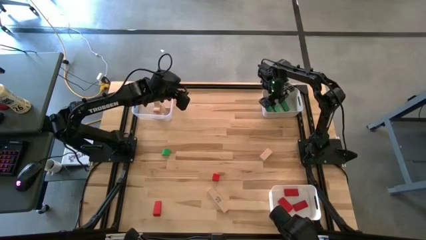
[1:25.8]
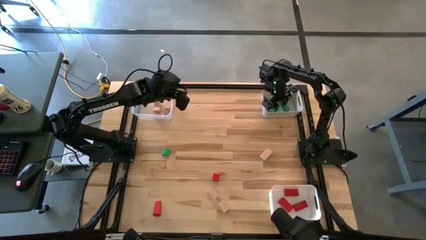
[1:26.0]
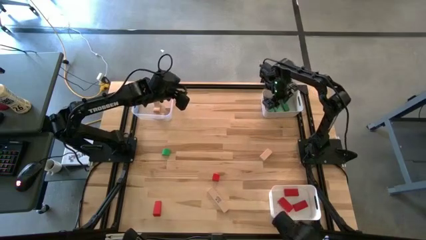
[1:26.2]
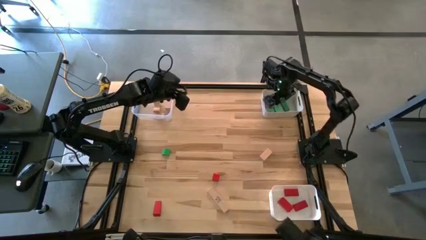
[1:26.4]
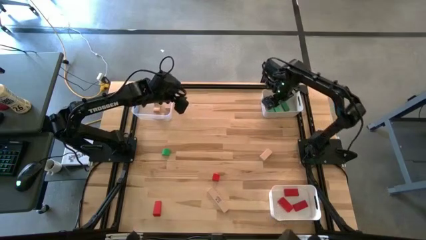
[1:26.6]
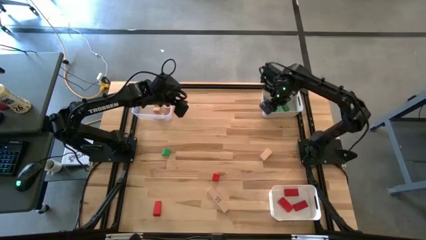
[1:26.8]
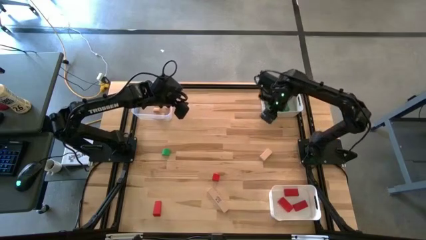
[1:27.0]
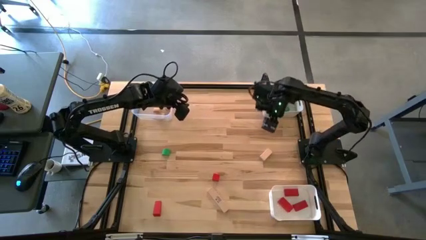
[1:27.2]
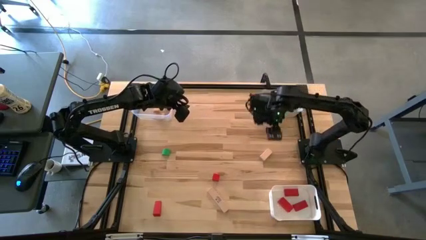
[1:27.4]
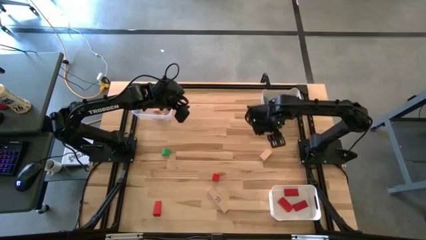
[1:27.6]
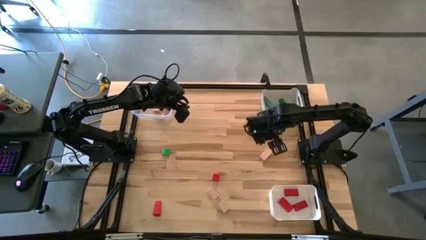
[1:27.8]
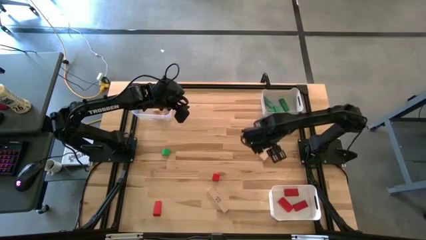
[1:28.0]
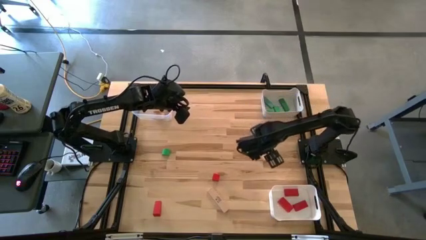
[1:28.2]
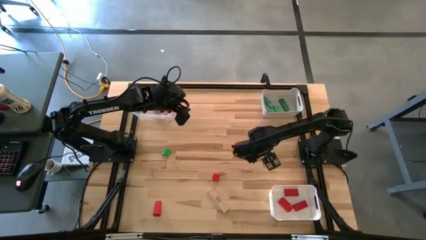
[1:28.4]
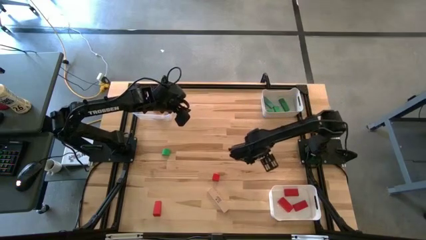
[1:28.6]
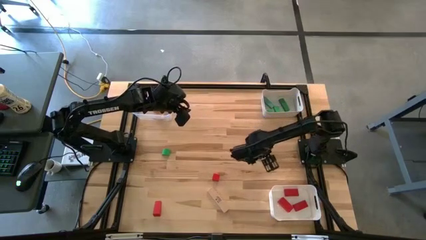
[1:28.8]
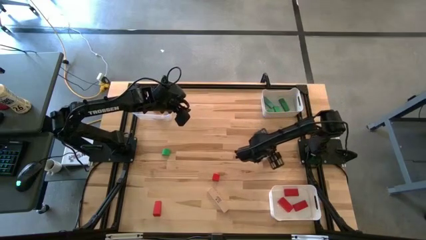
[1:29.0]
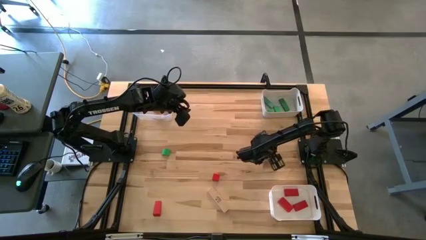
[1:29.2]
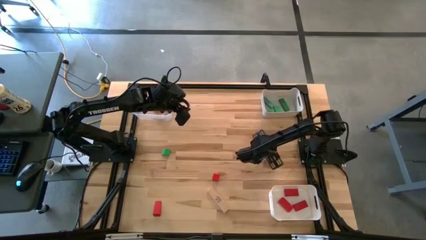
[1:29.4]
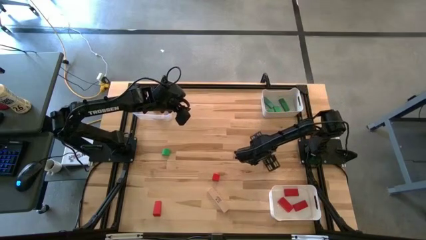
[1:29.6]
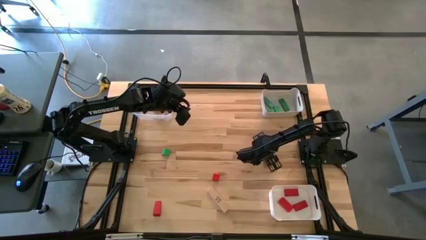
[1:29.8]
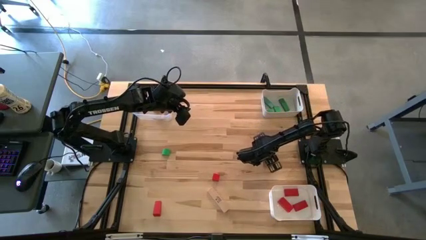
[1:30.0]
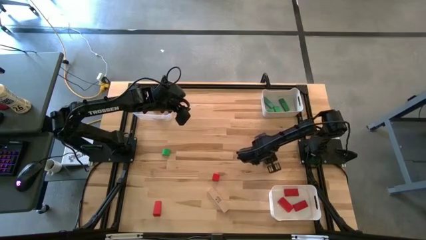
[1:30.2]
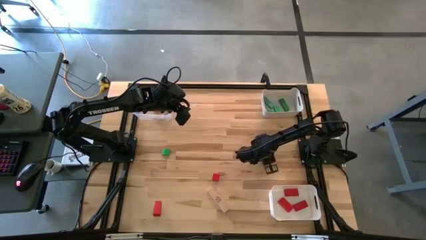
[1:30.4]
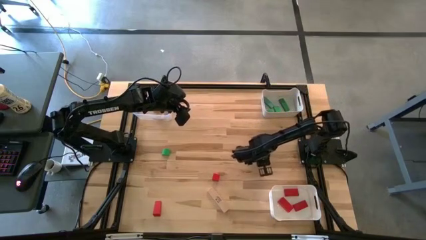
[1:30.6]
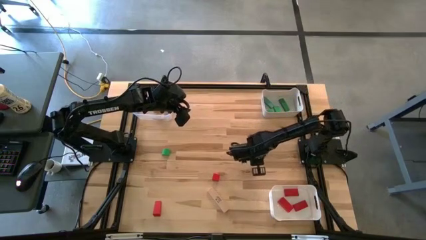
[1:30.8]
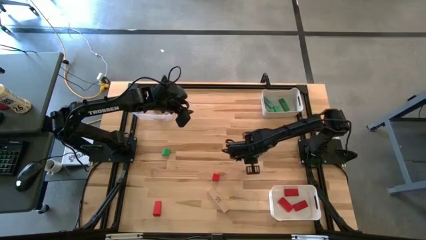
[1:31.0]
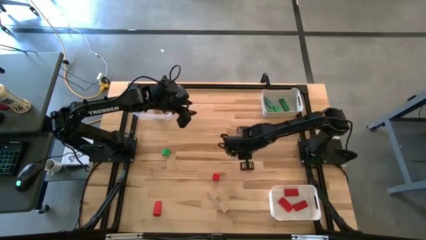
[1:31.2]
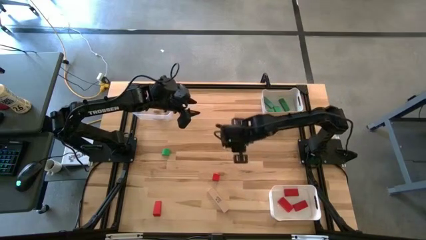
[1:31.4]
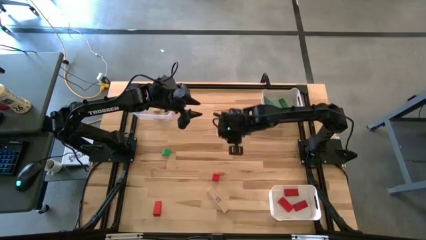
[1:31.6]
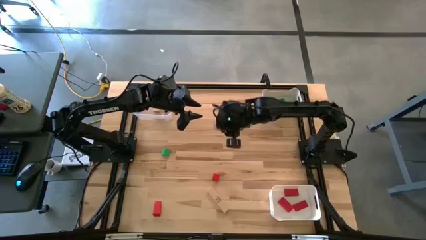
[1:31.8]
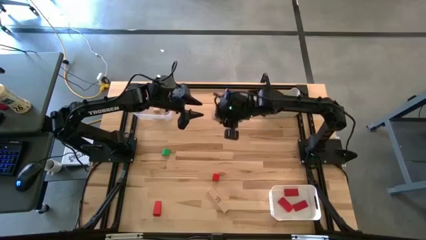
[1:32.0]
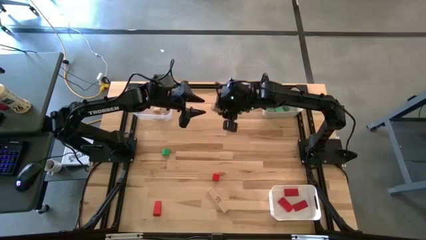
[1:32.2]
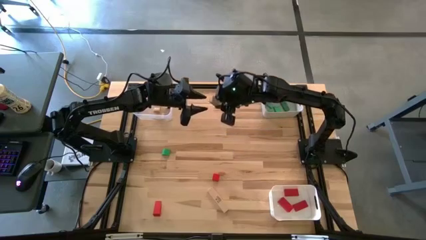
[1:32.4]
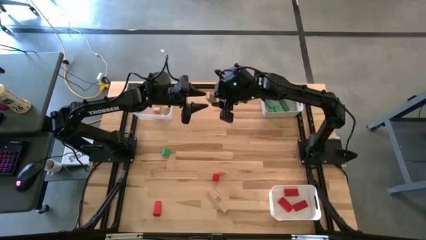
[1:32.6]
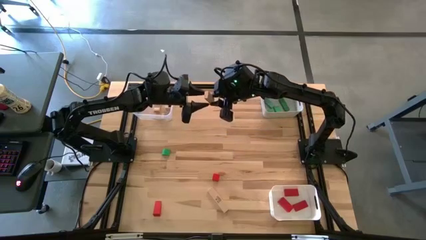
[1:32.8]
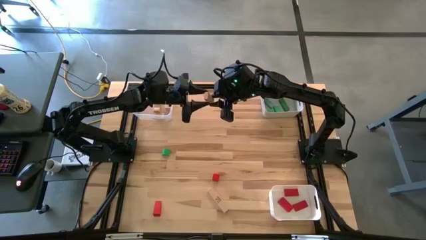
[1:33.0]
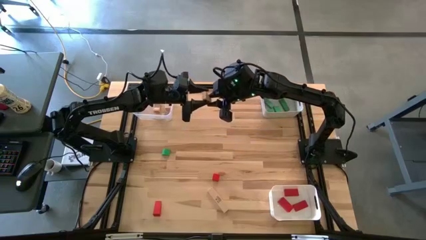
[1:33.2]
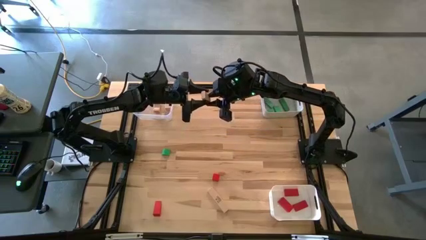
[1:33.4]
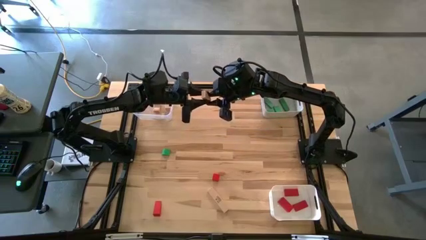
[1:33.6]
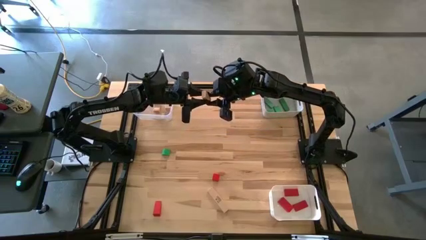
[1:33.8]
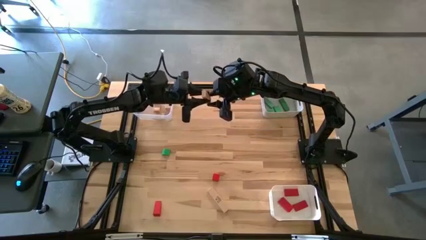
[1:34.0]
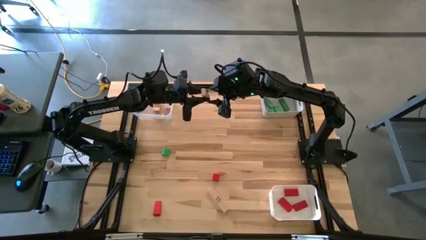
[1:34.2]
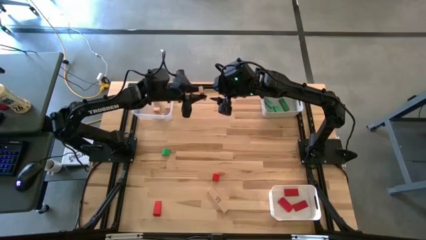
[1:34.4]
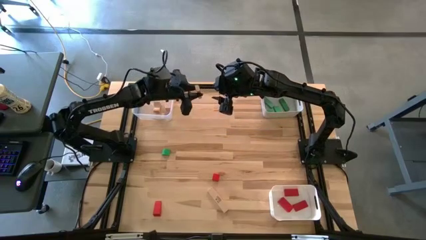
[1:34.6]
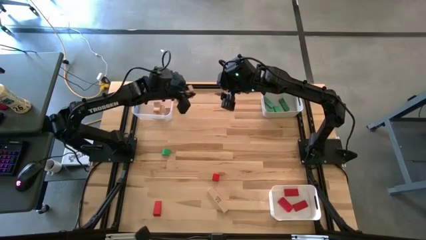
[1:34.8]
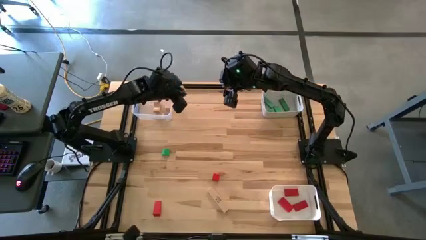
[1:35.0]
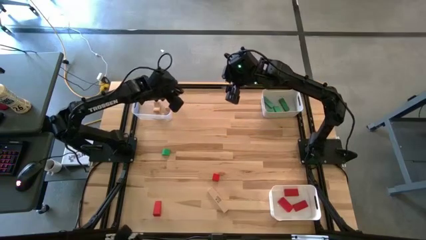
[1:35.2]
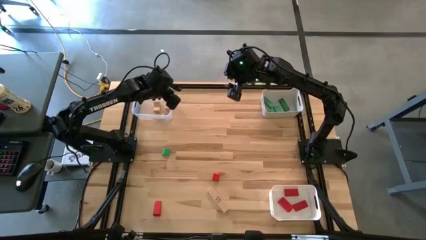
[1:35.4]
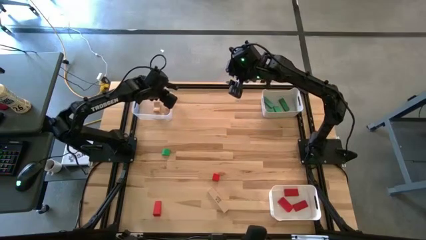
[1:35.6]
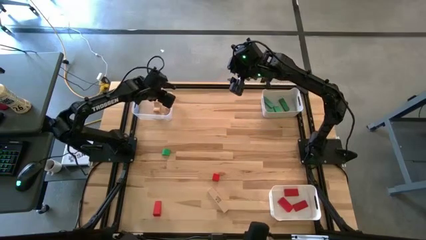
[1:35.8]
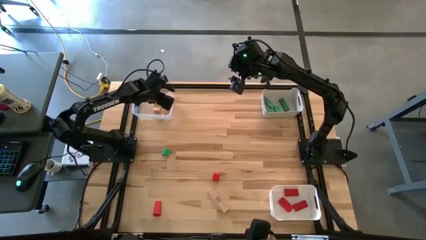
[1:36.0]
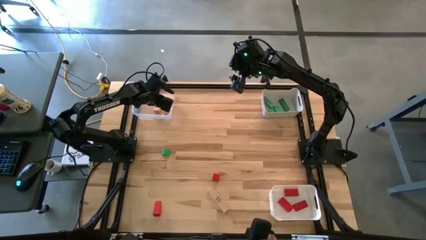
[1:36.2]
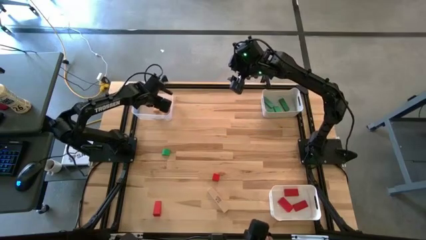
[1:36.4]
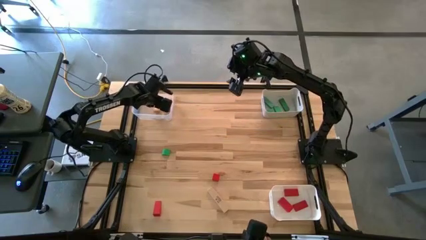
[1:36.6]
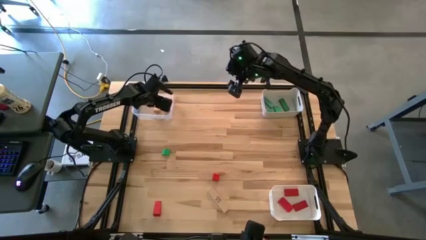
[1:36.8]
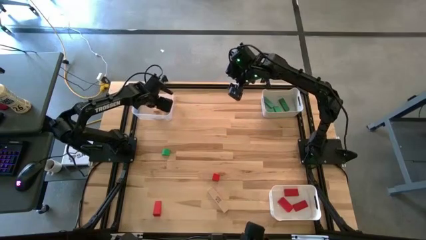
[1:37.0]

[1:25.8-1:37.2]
Task: Sort & place blocks by color
Put the brown block into the transparent bin

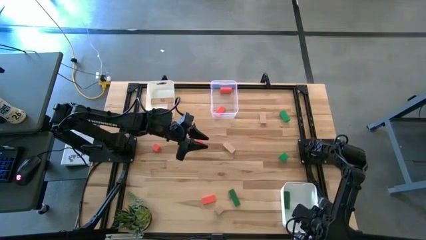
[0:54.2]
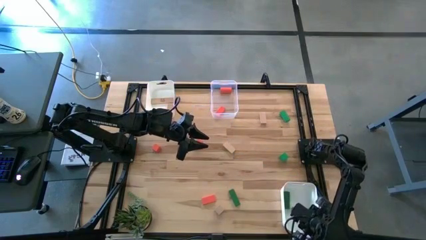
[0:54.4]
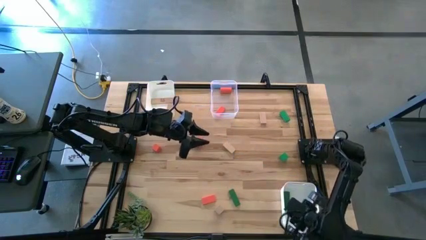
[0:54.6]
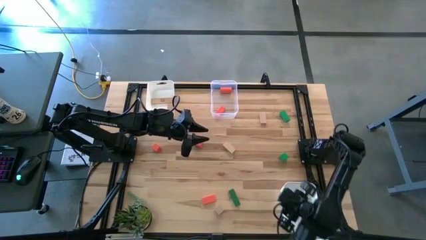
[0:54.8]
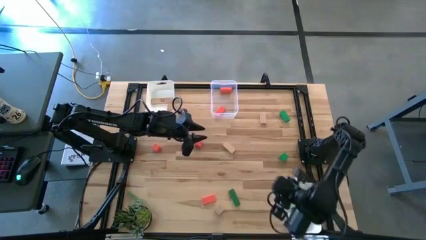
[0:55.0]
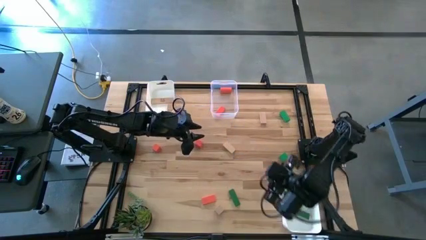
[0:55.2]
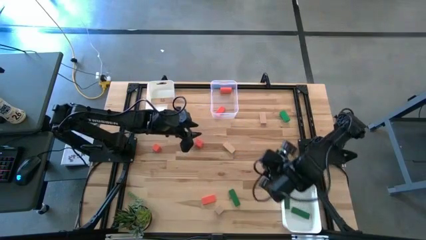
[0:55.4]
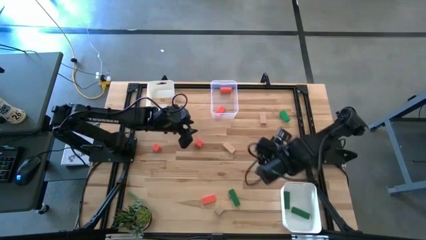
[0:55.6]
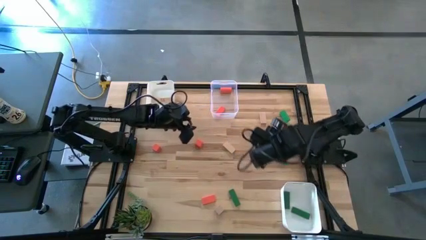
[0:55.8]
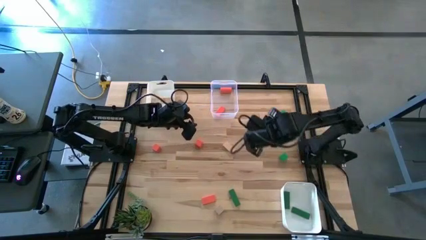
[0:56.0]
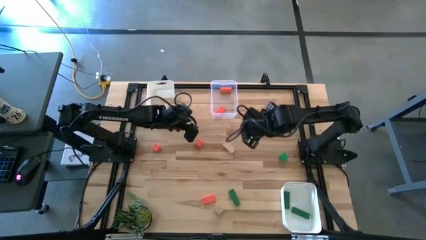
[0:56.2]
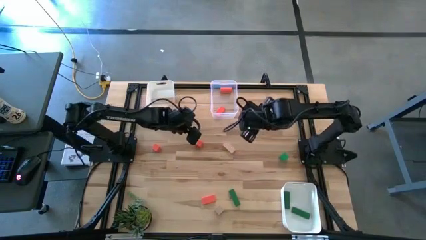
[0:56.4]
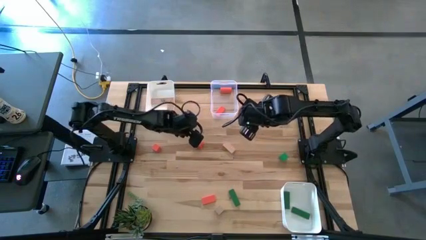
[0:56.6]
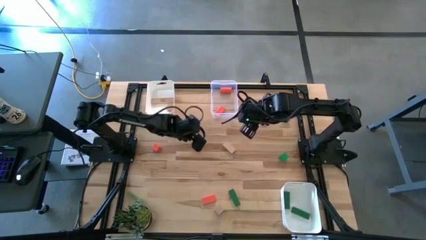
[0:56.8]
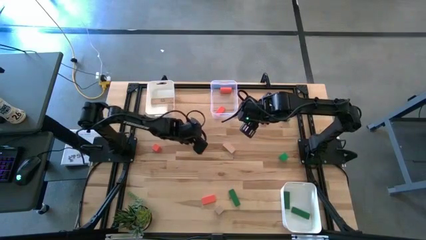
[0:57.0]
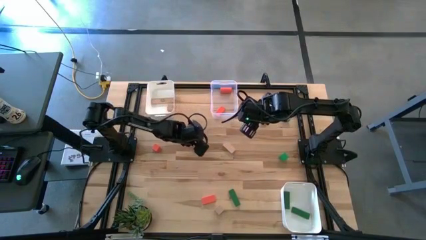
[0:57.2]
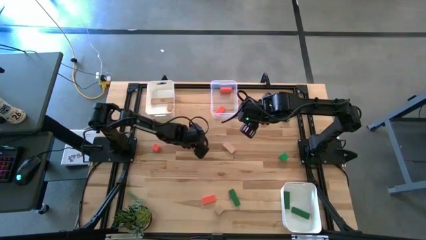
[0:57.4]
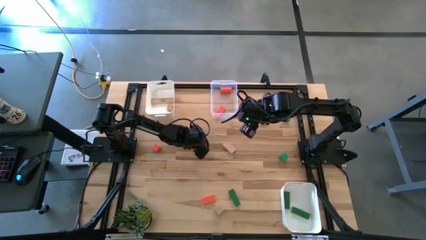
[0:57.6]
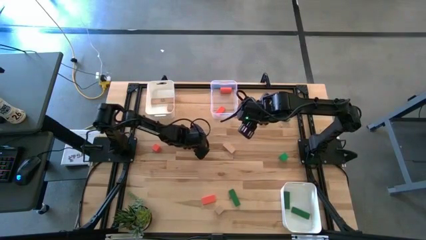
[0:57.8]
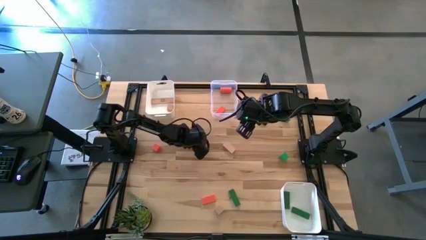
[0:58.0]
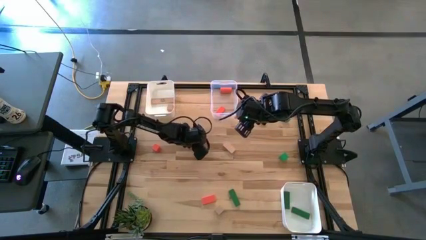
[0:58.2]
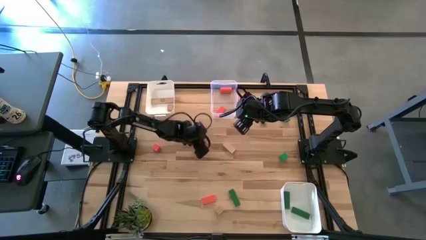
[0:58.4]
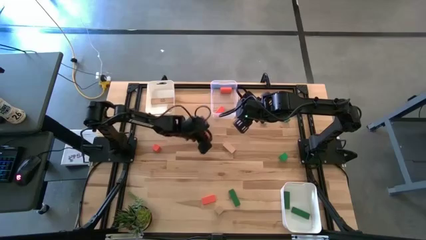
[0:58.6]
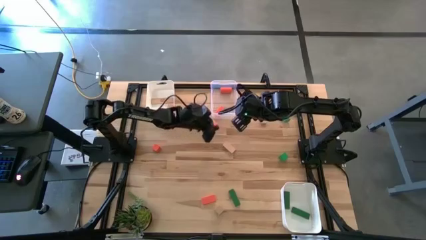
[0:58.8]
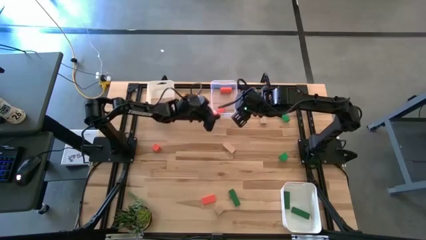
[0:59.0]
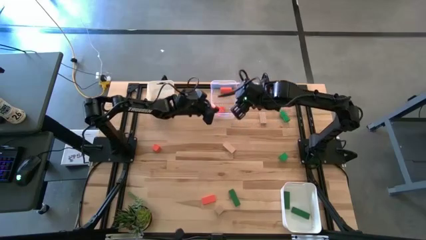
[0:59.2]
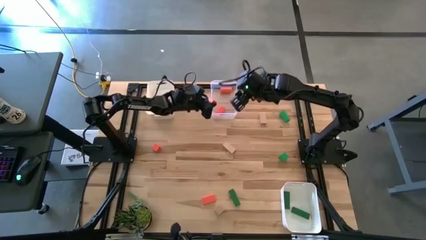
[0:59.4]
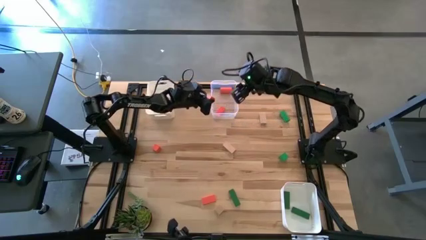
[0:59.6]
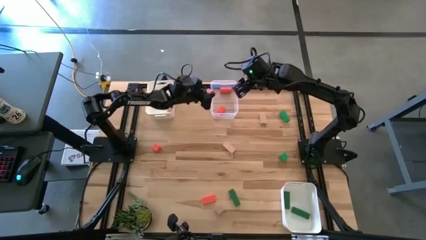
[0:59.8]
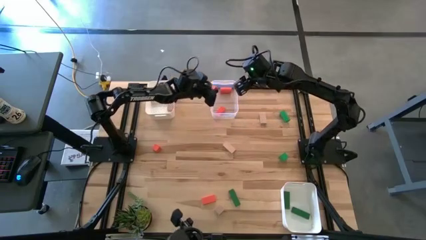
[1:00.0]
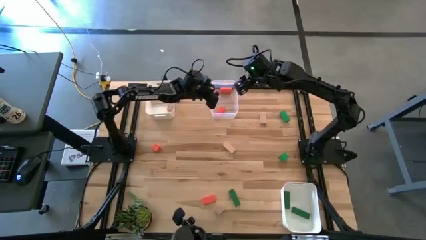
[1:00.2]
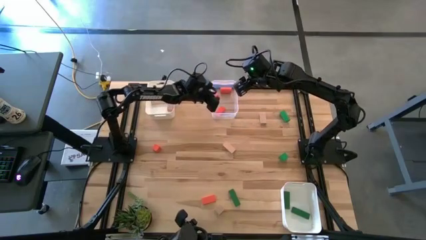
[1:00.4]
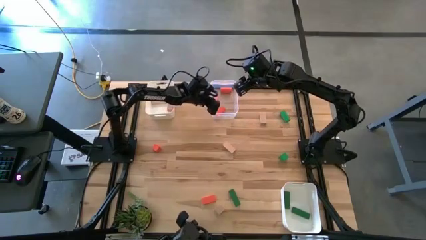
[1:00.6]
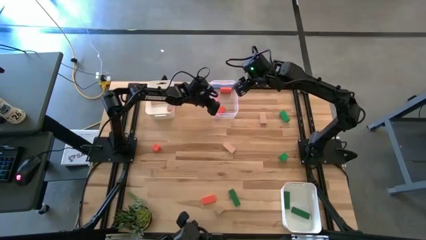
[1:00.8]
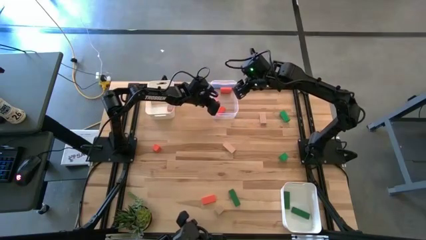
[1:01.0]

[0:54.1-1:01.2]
Task: Sort & place blocks by color
Put the orange block into the transparent bin
